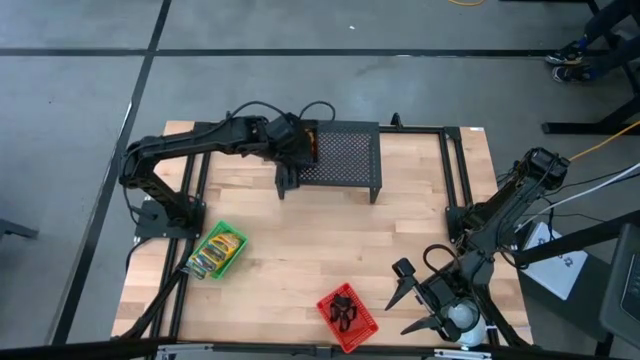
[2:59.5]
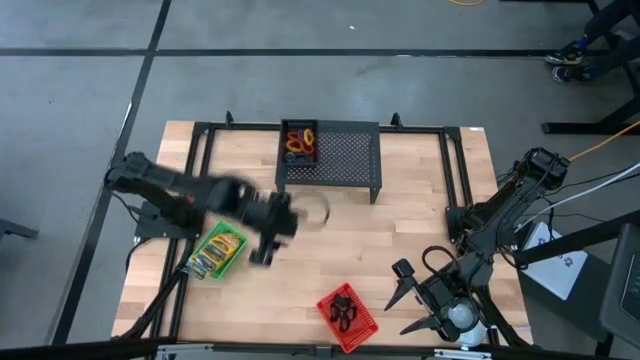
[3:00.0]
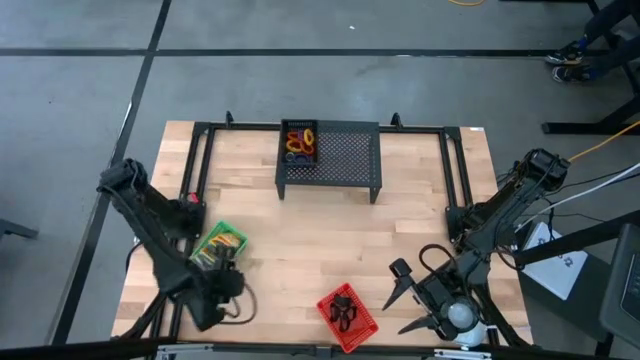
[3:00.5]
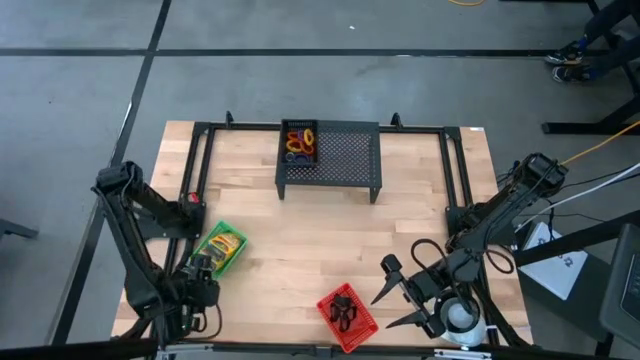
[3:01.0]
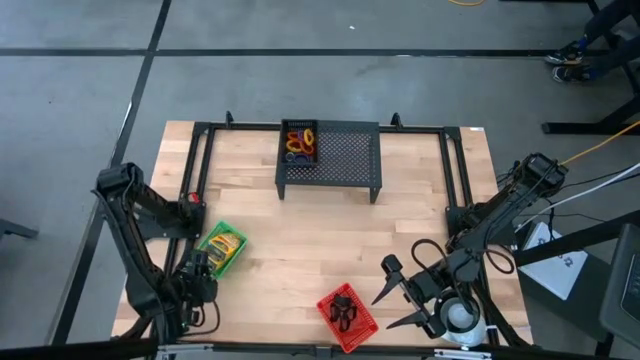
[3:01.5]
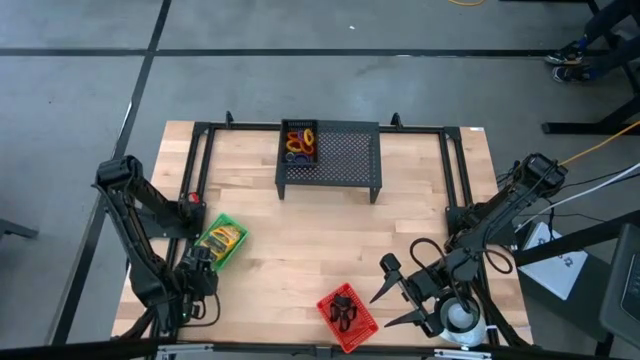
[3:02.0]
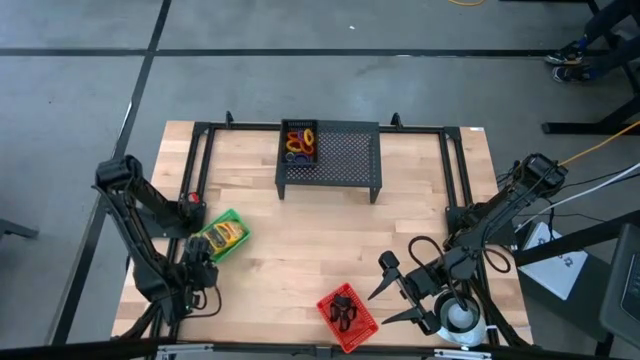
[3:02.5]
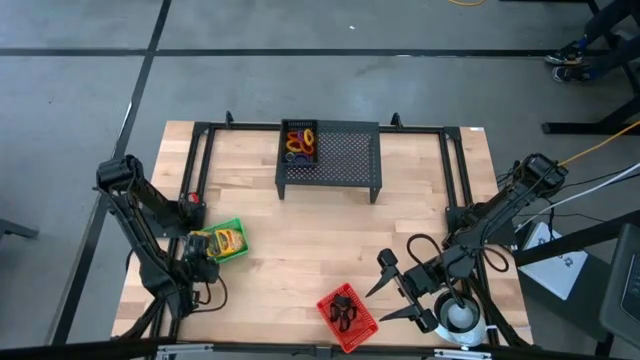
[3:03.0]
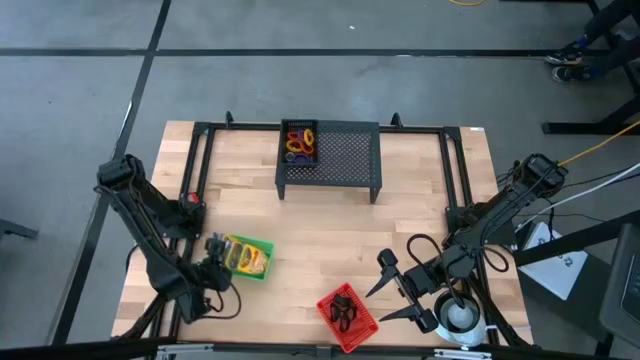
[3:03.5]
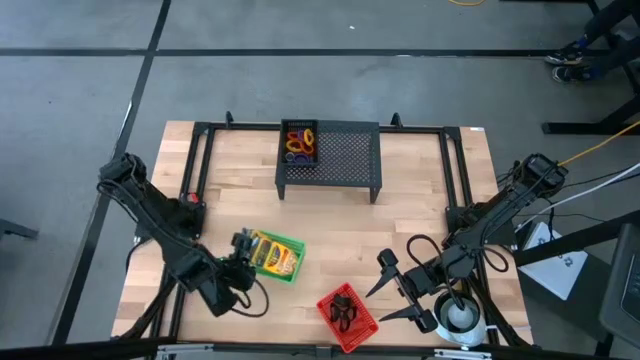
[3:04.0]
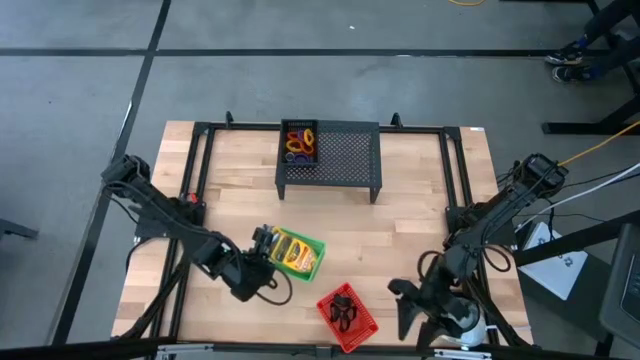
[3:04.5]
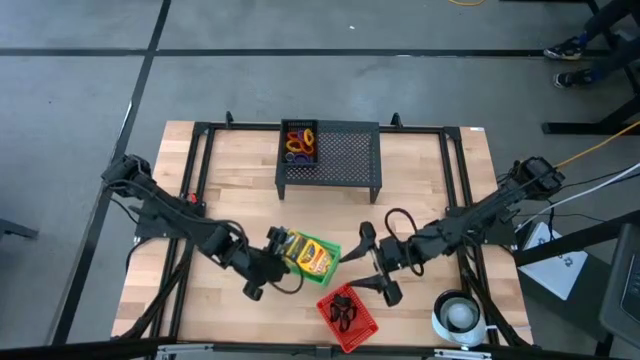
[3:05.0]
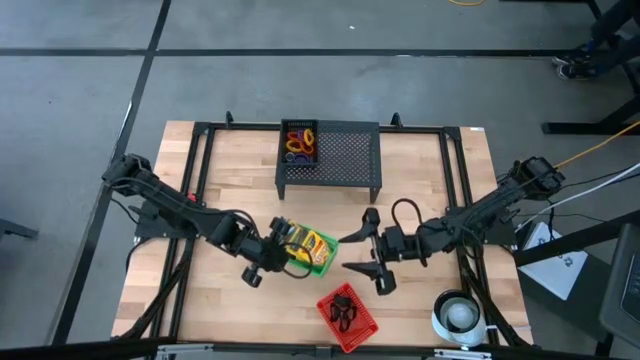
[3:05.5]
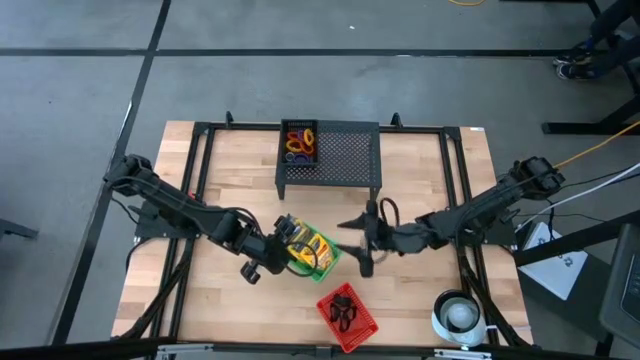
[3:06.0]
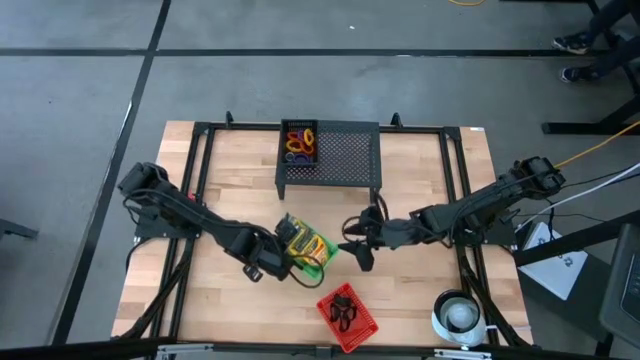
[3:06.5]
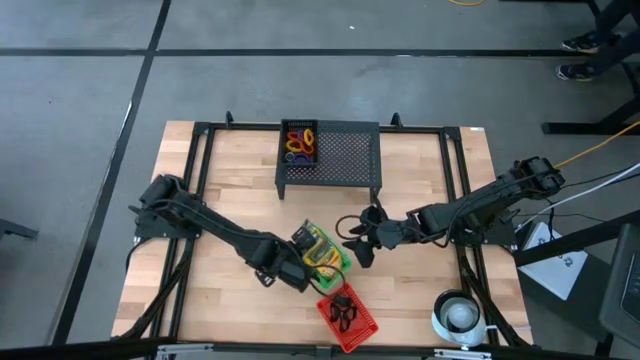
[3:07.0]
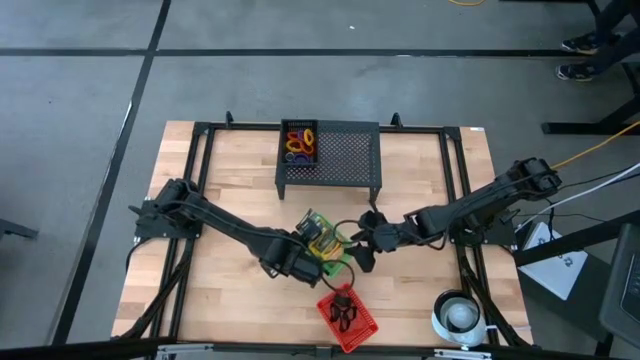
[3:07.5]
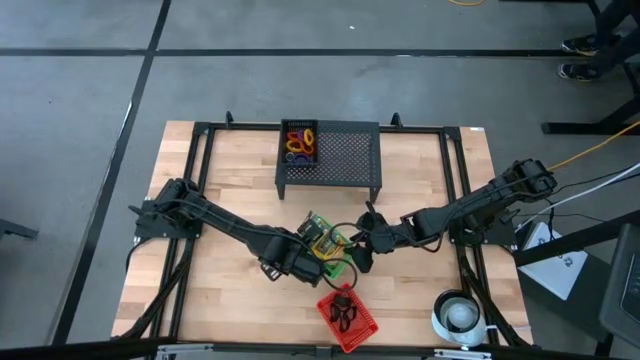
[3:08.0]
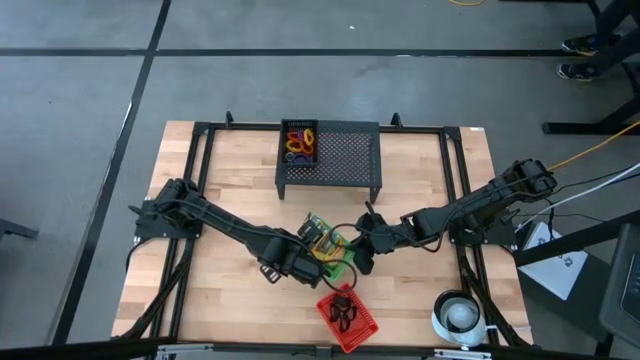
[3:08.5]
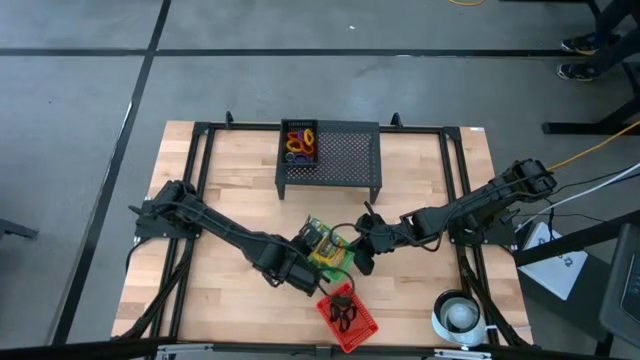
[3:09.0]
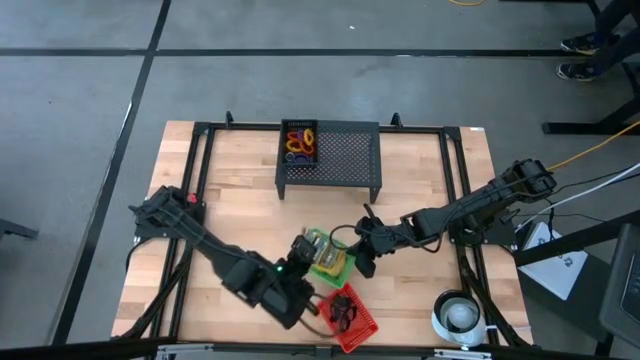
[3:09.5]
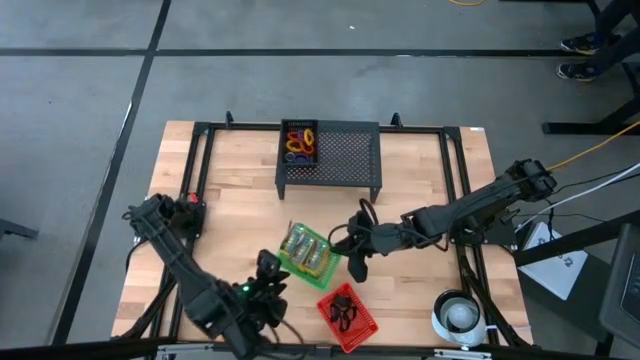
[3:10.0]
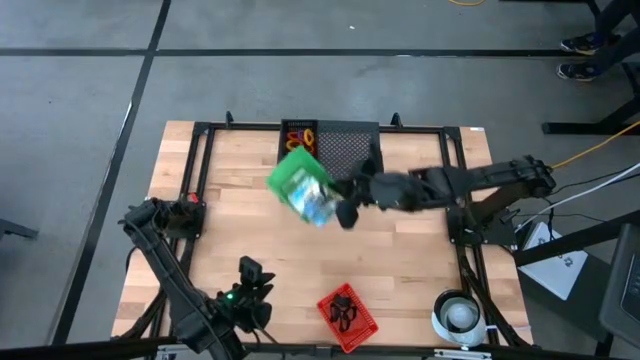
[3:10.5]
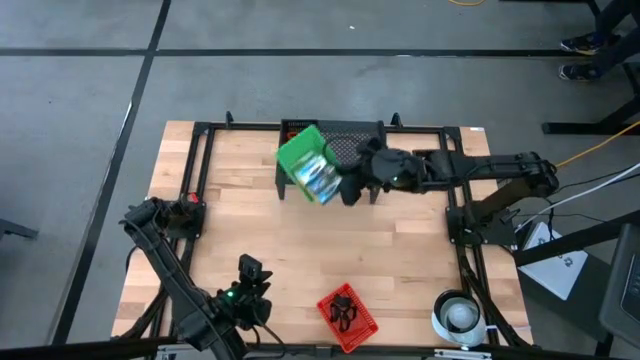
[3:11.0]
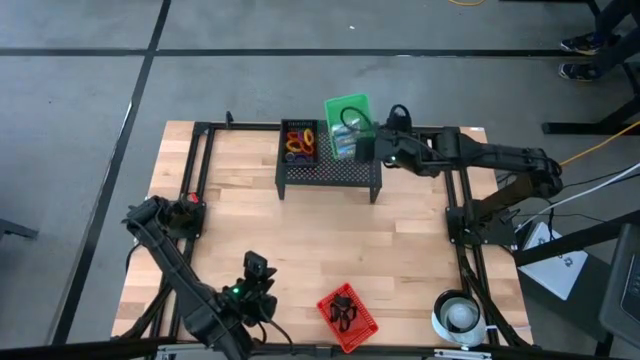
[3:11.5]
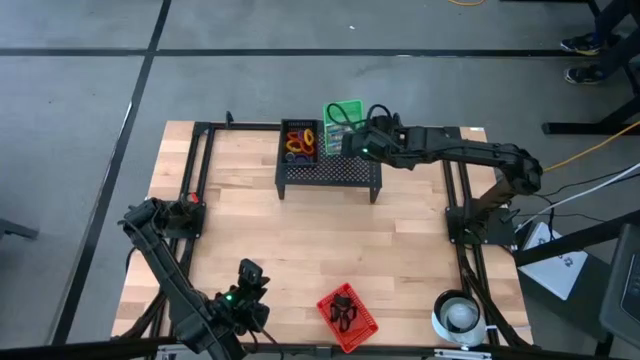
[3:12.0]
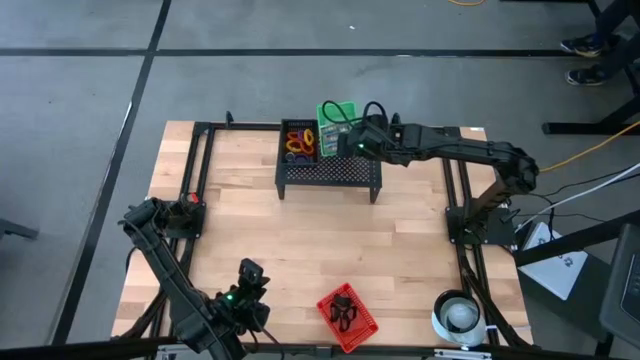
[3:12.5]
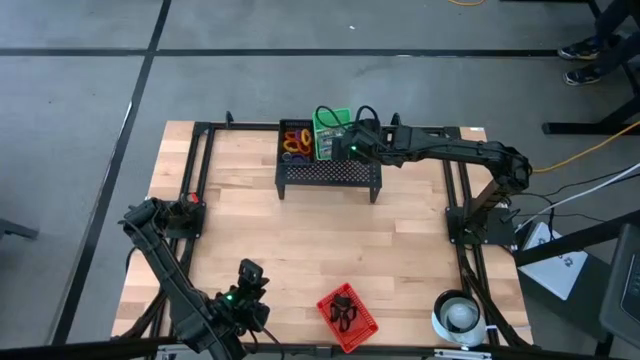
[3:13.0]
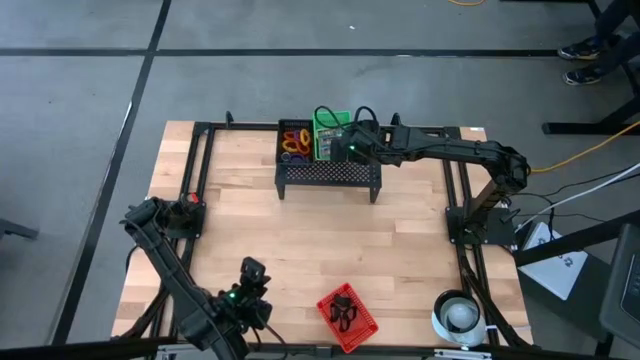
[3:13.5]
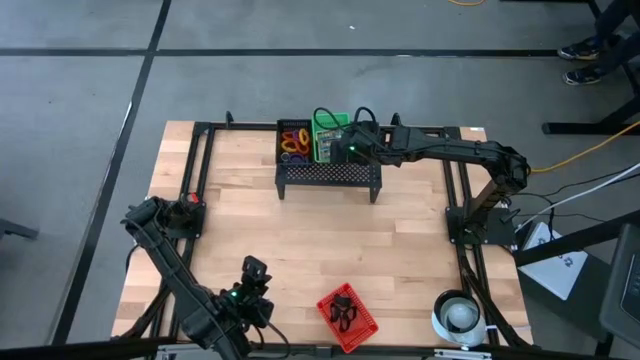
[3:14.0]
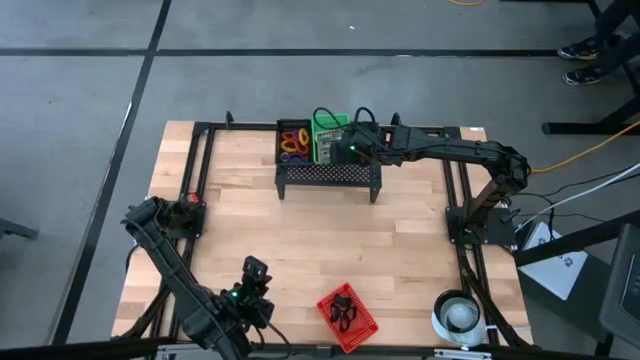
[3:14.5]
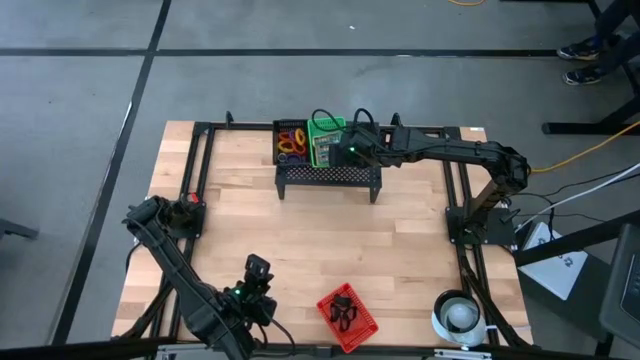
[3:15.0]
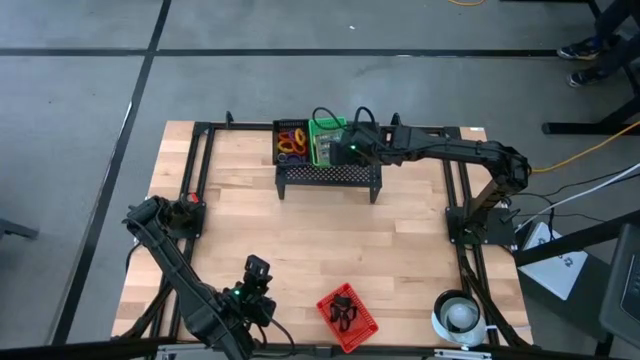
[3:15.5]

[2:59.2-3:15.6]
Task: Pick & Place Office Desk Supplies
Put the green bin on the shelf

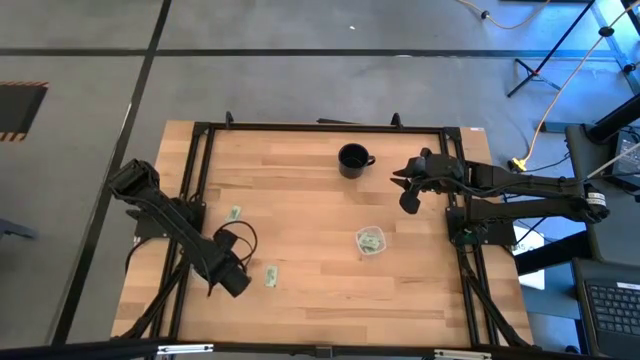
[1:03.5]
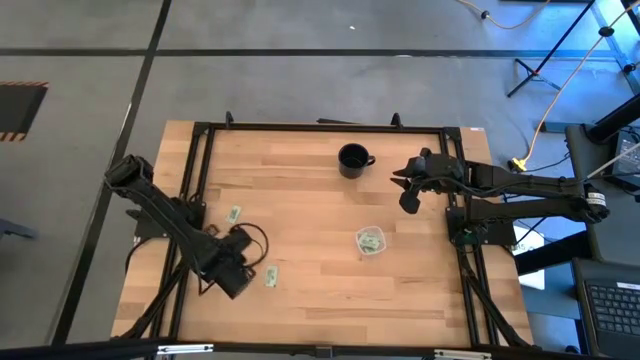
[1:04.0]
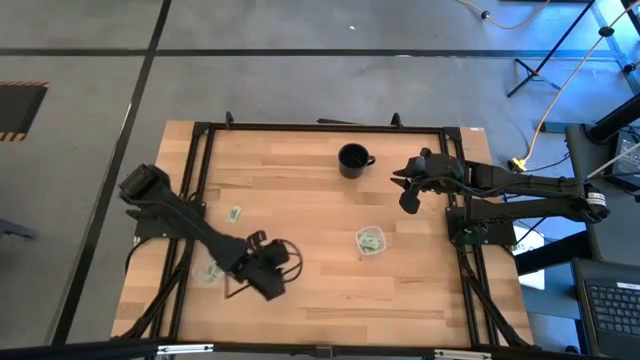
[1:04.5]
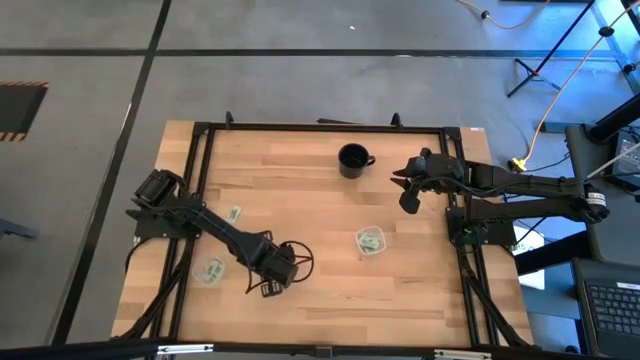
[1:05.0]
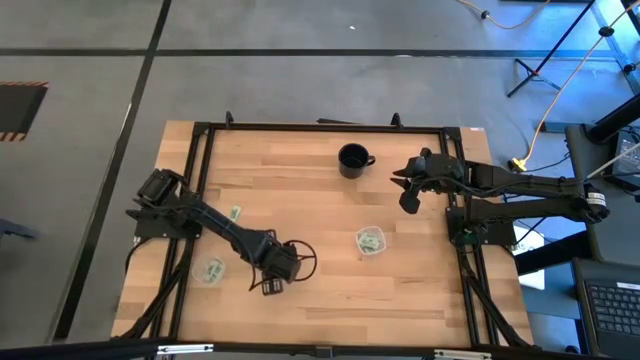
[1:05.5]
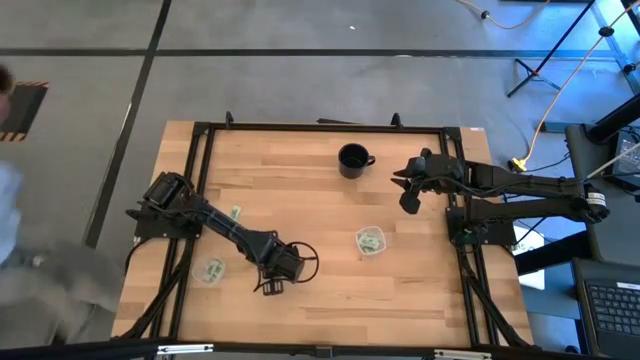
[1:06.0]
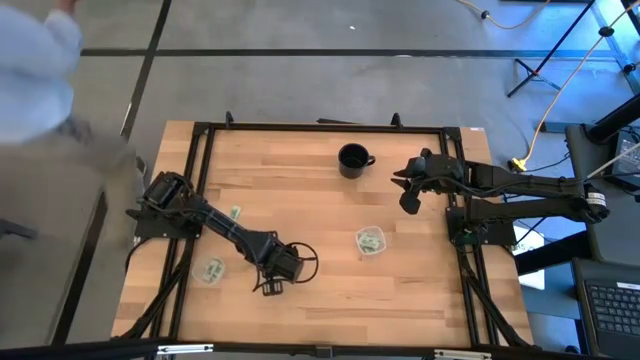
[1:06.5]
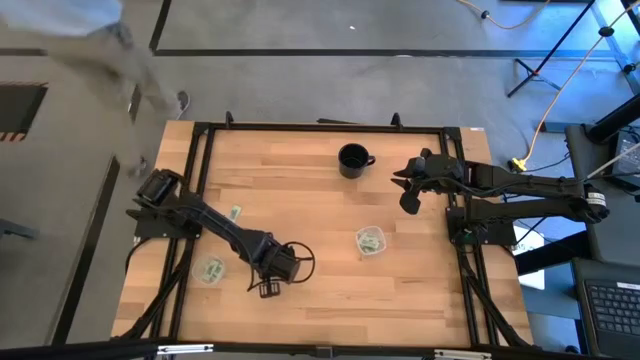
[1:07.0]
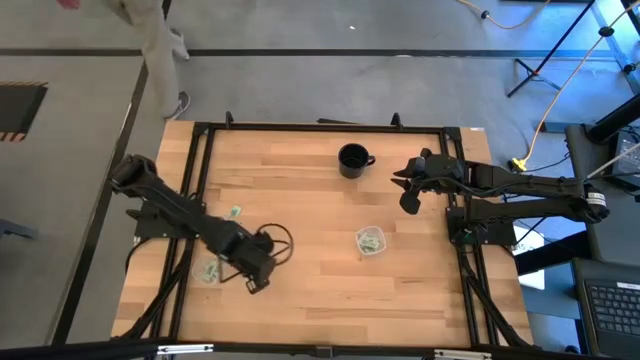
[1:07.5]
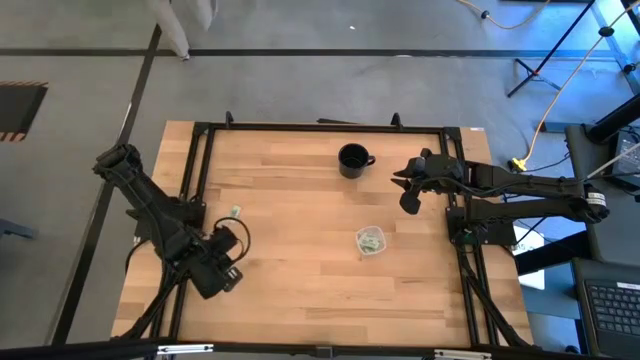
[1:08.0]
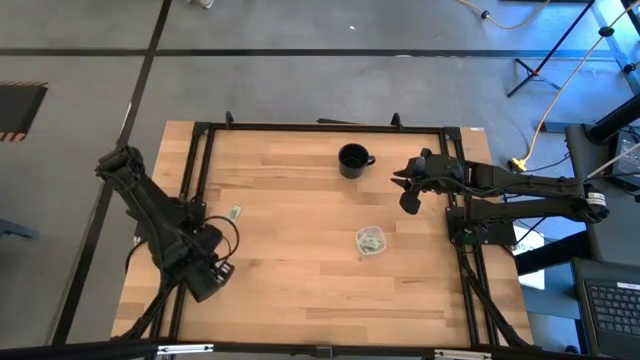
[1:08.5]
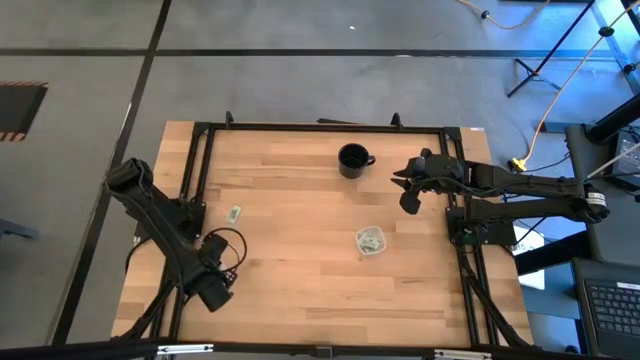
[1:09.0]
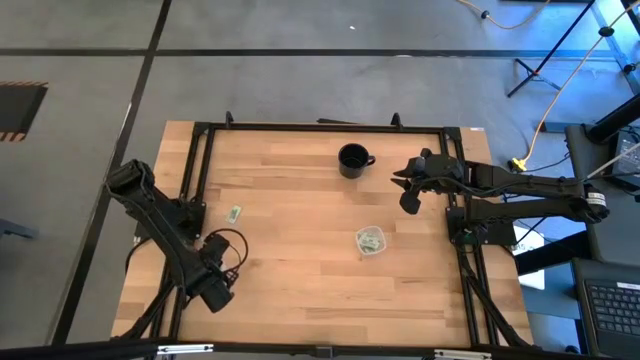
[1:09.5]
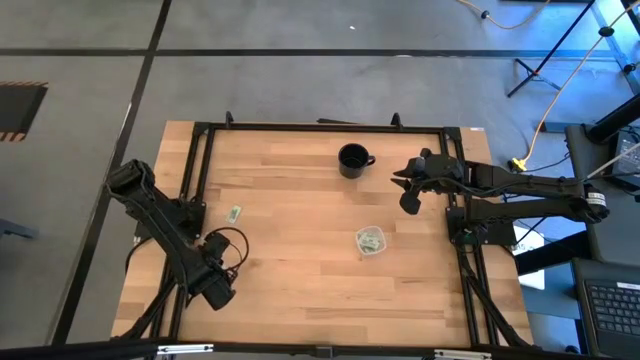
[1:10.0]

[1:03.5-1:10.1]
Task: Pick and place Stevia / Truvia into bins
Put the bottom stevia packet into the left transparent container
